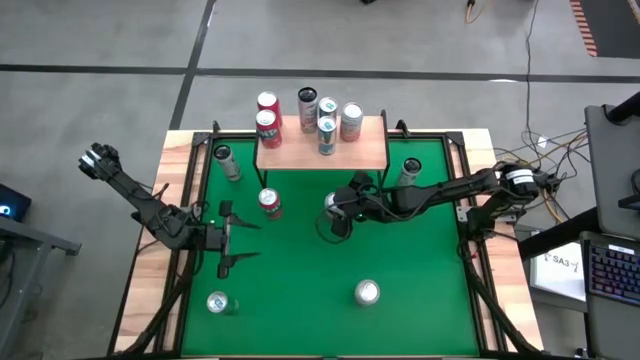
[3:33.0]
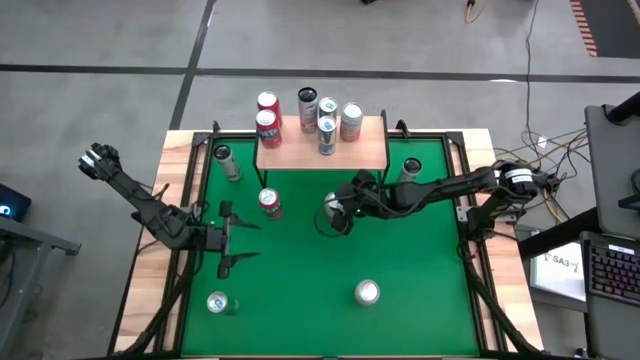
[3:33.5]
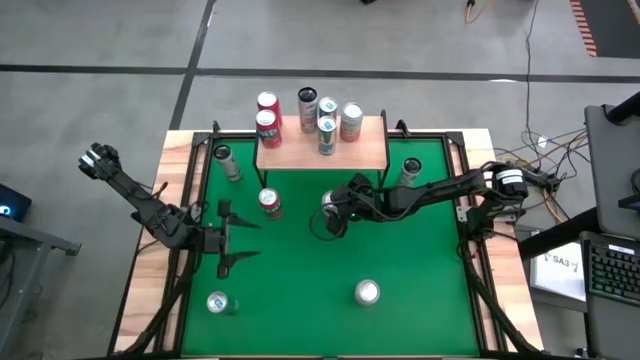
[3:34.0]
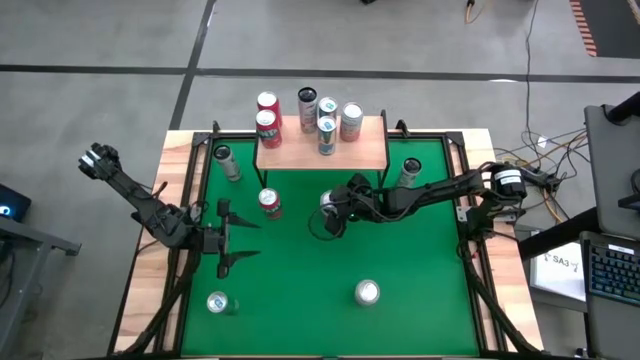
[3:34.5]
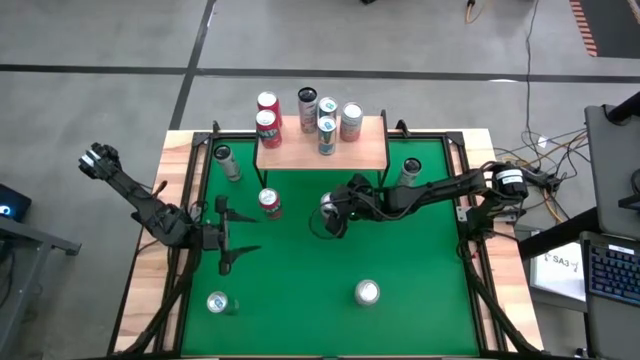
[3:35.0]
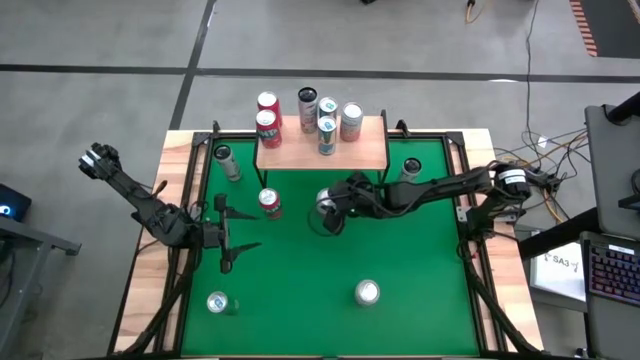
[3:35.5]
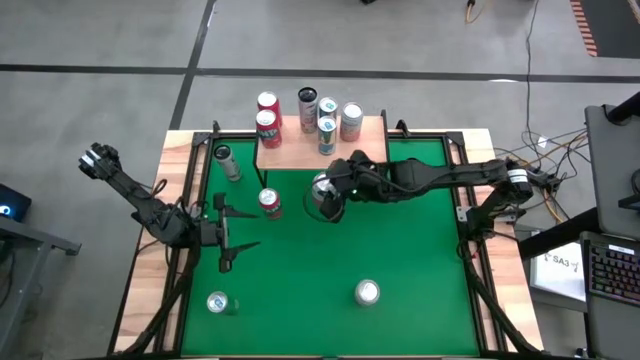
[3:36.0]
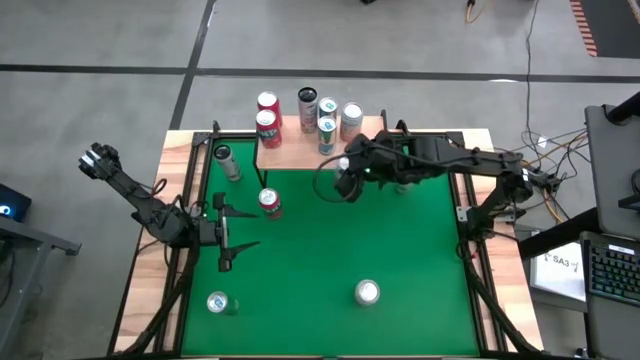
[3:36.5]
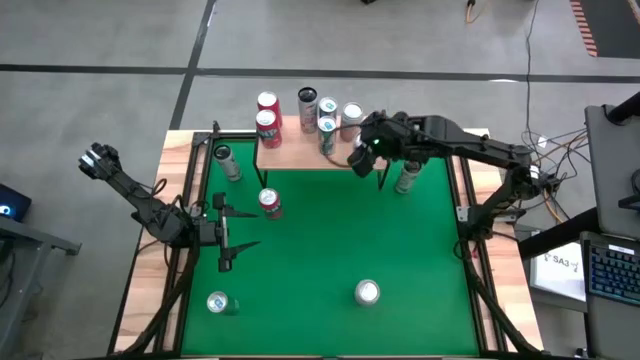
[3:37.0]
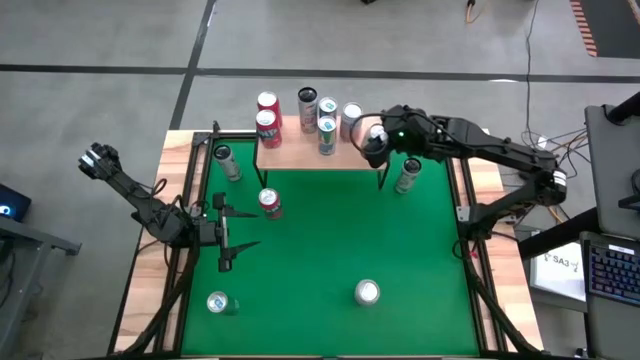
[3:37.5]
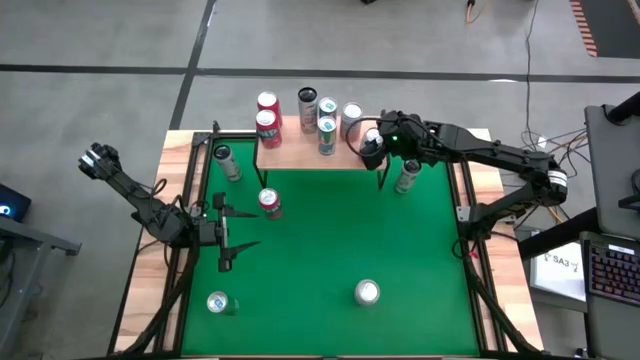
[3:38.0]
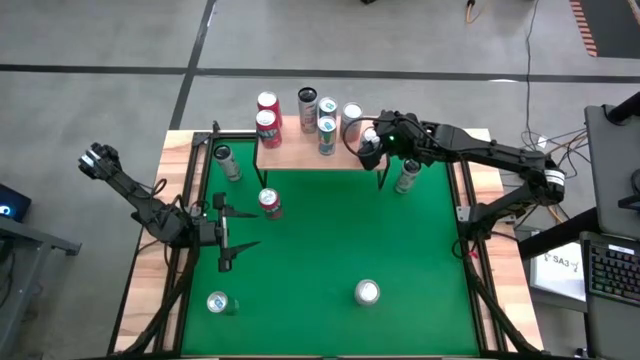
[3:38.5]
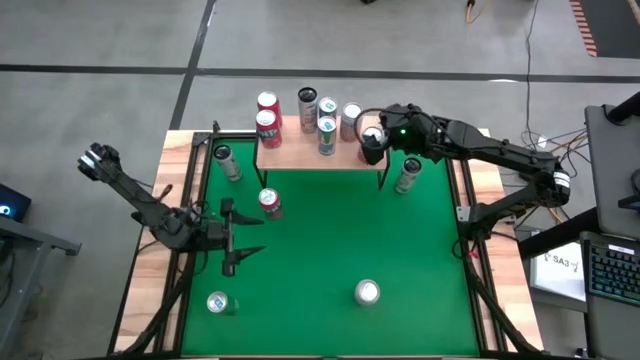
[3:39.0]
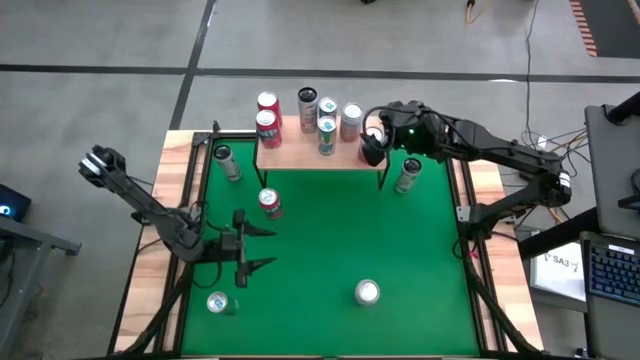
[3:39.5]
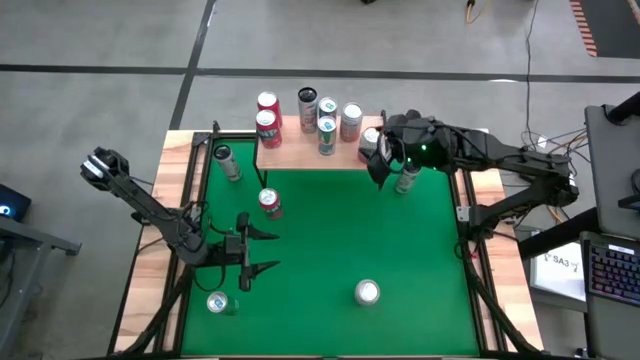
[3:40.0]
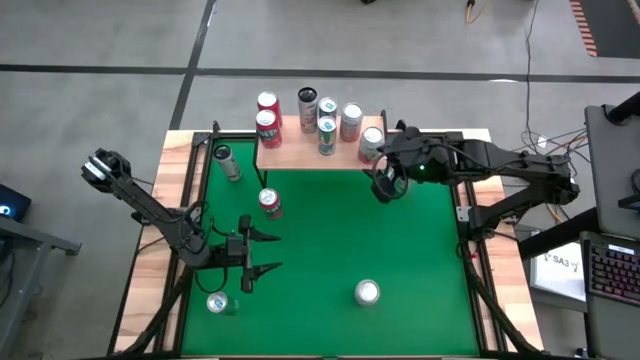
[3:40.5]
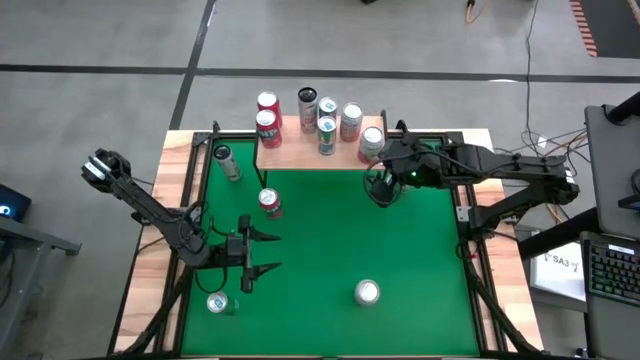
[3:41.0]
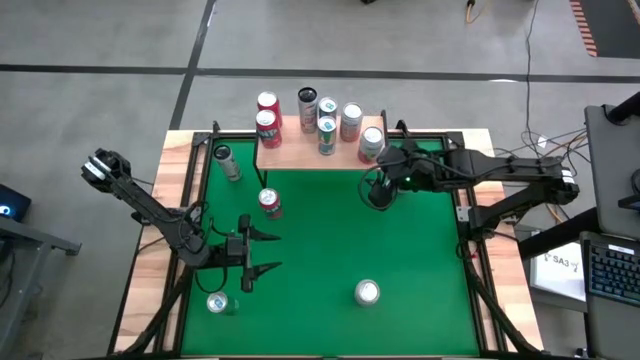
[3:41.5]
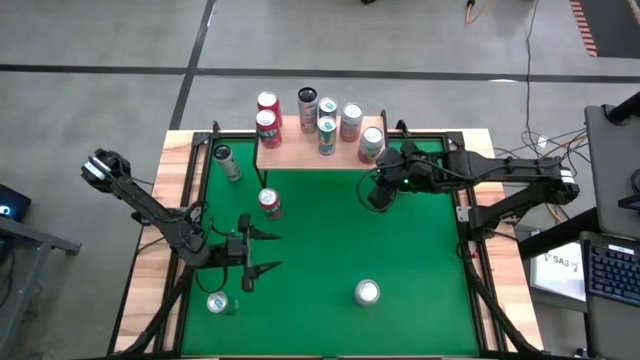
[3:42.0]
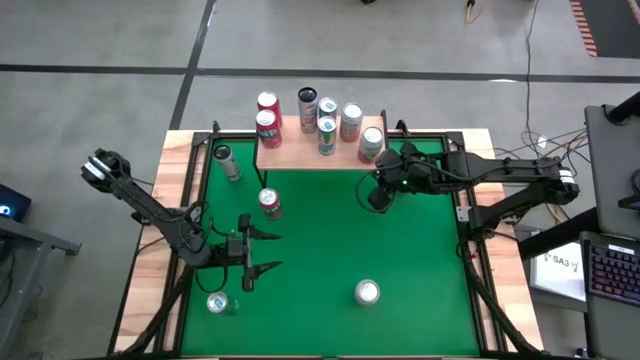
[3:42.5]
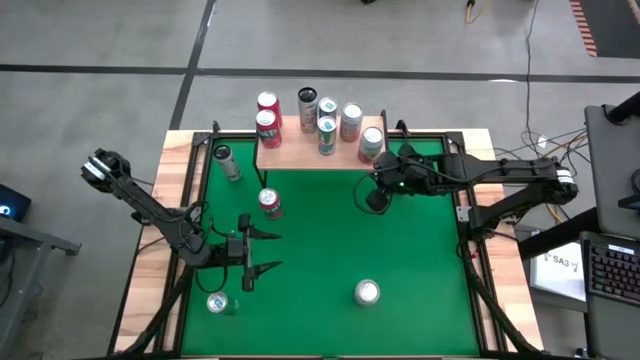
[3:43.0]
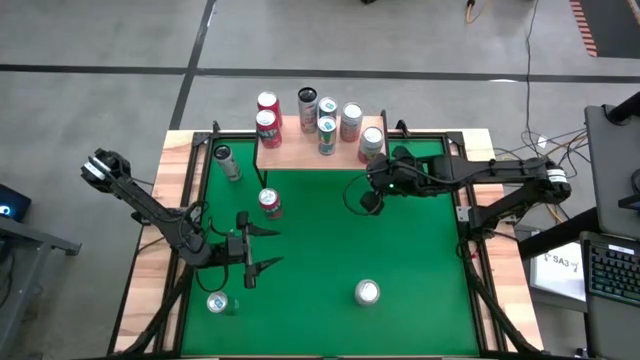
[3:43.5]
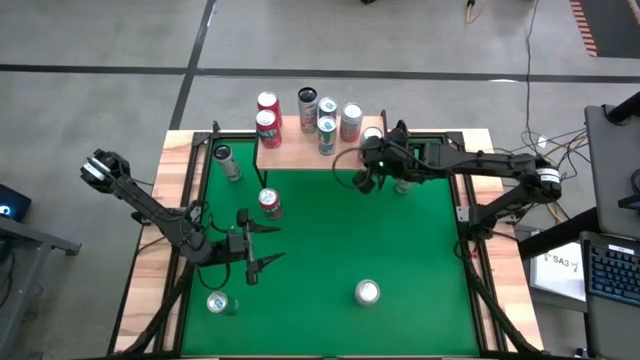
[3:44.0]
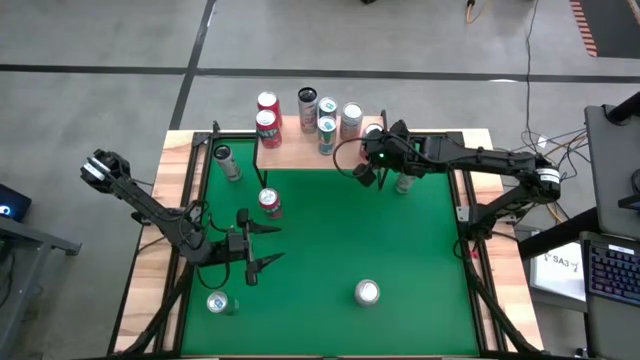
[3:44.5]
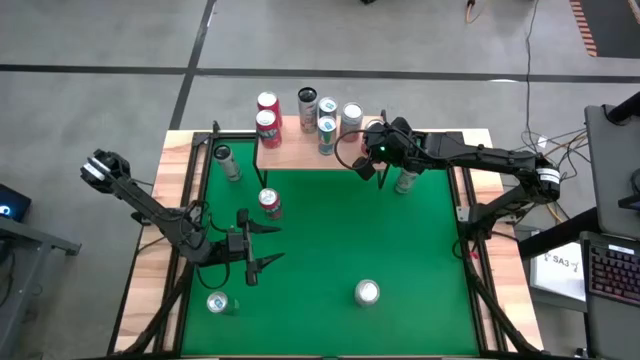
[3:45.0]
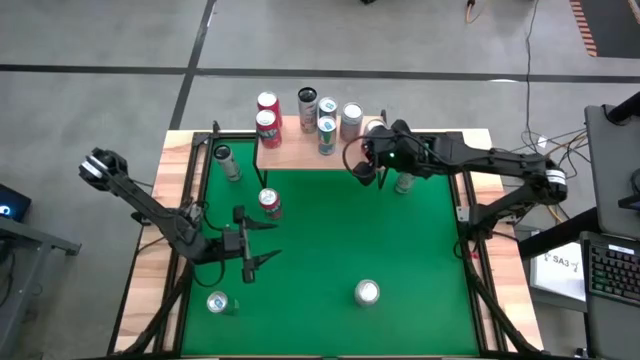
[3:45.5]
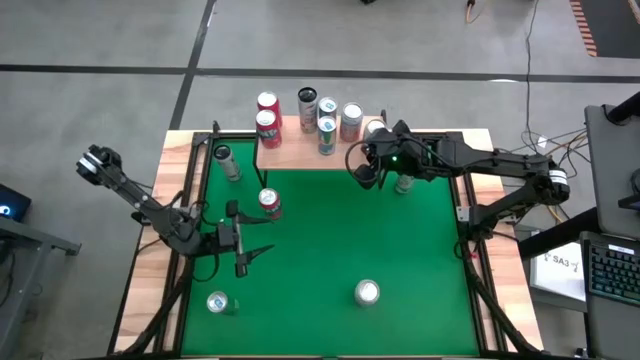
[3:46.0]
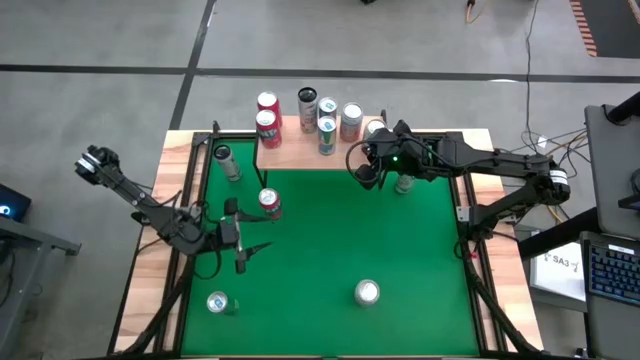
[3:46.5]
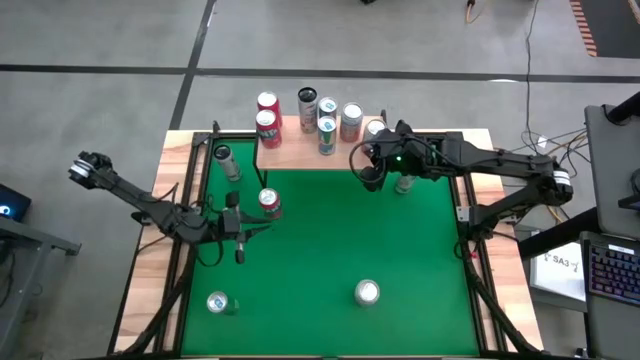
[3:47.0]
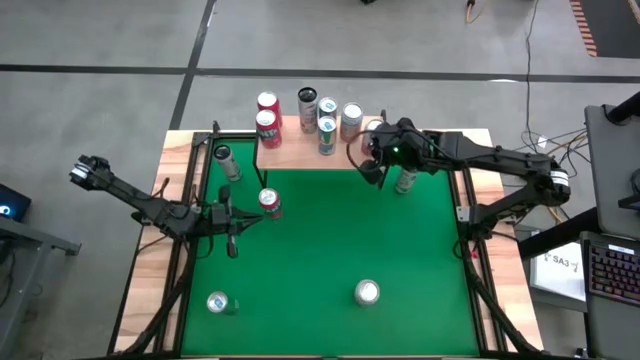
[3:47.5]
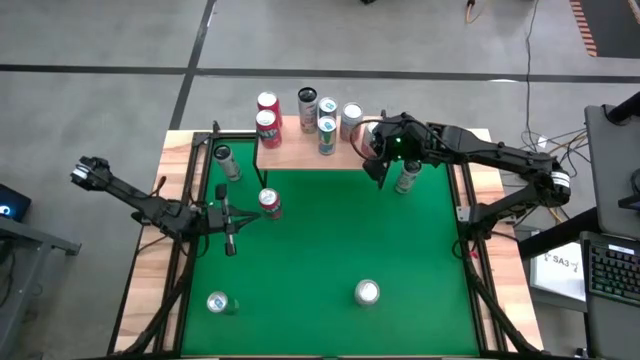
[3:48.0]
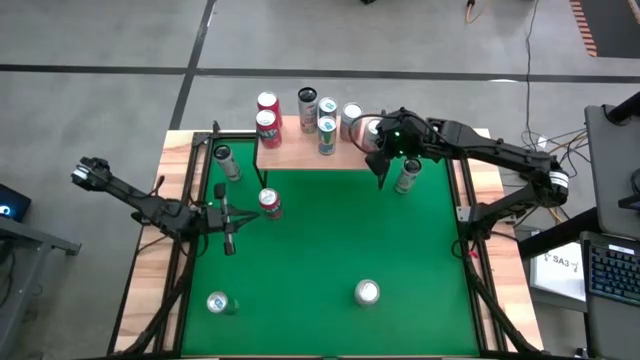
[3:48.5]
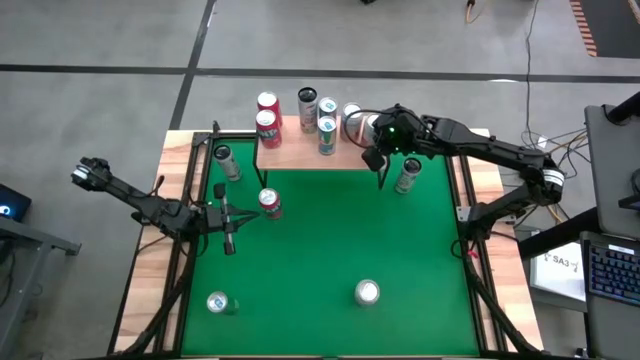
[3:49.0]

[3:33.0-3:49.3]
Task: Place canned beverage on shelf
Put the top white and pink soda can on the shelf

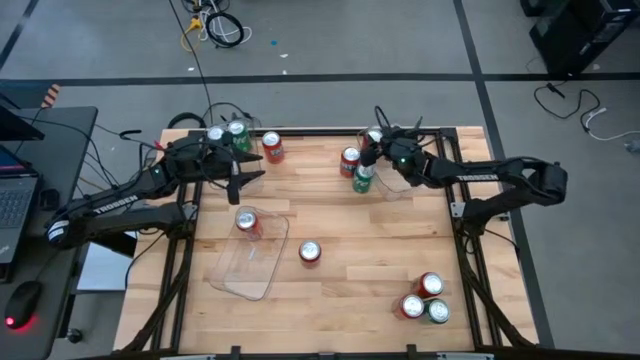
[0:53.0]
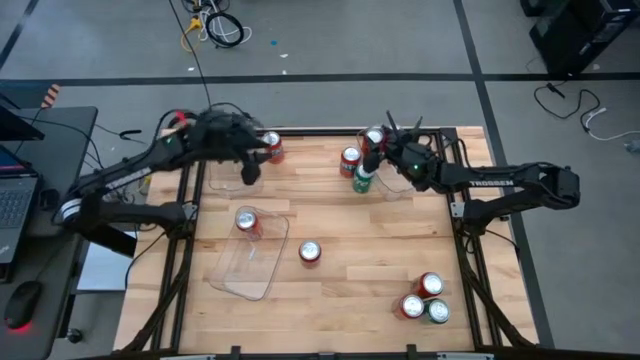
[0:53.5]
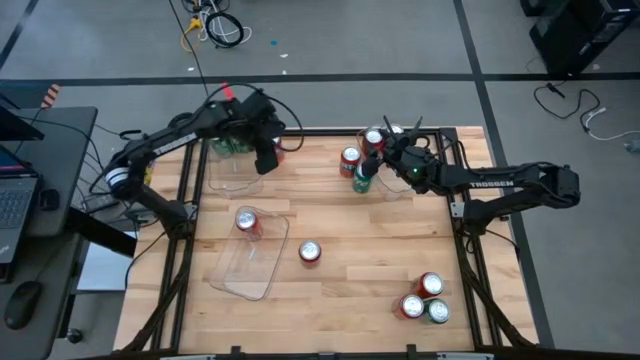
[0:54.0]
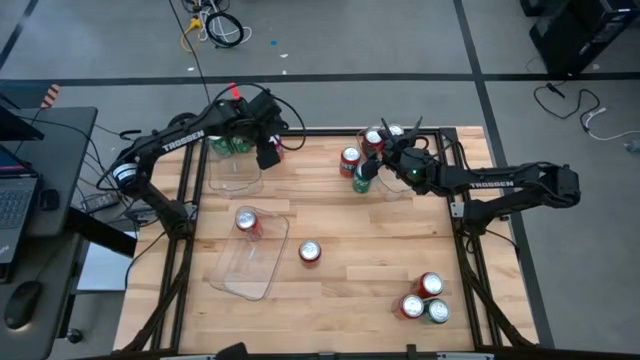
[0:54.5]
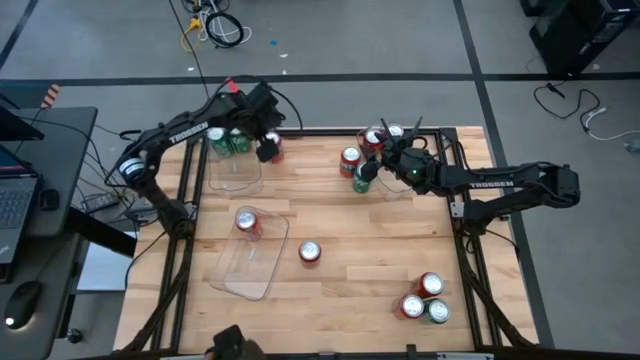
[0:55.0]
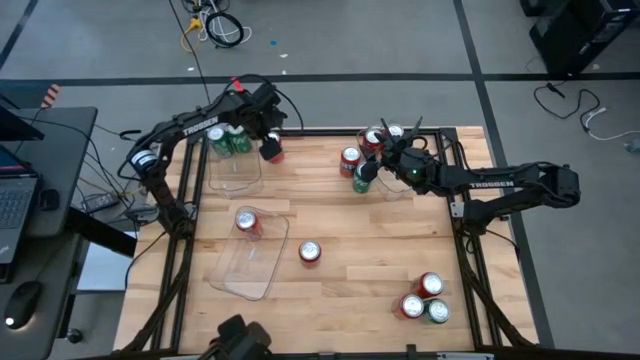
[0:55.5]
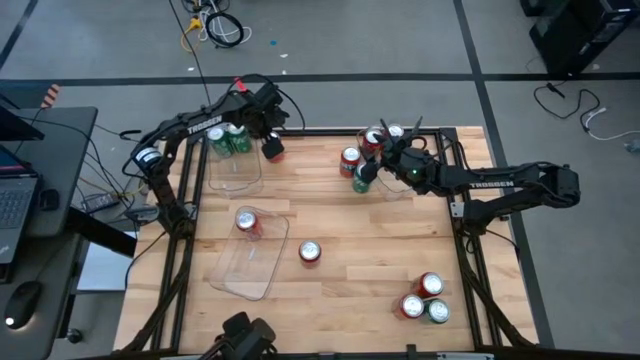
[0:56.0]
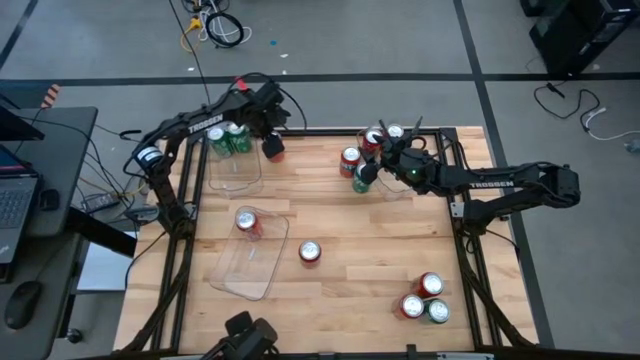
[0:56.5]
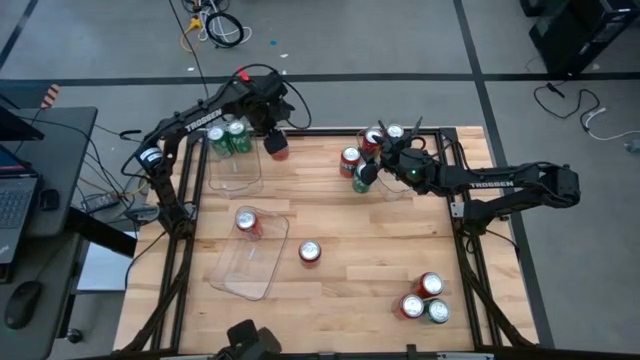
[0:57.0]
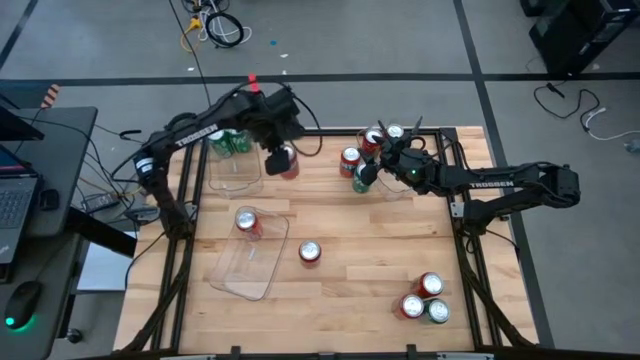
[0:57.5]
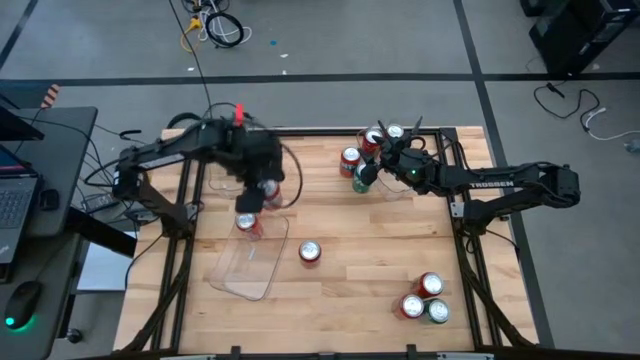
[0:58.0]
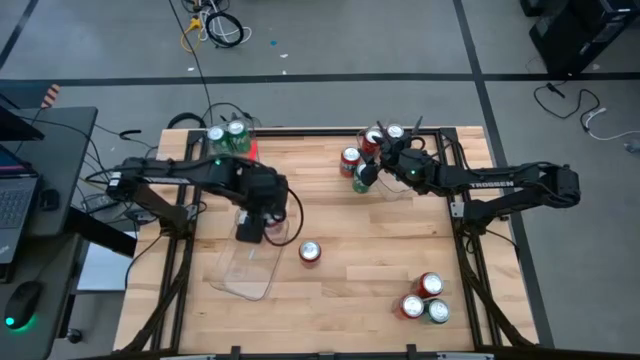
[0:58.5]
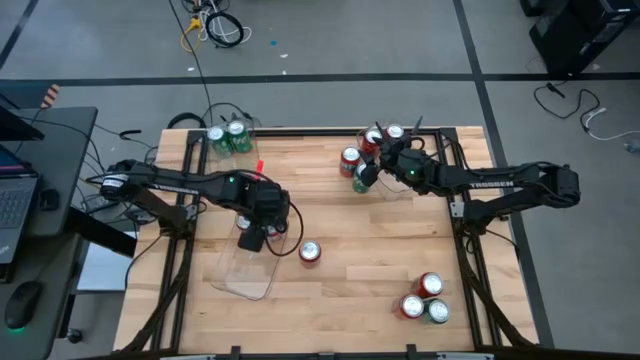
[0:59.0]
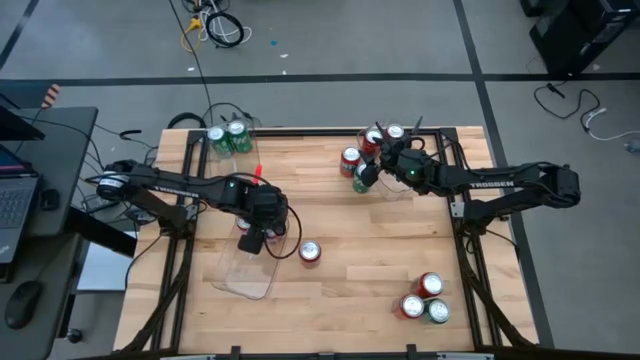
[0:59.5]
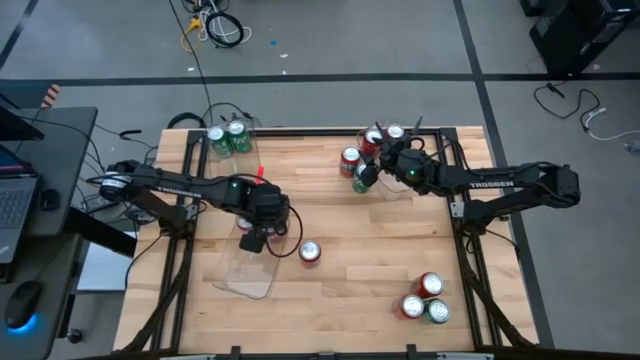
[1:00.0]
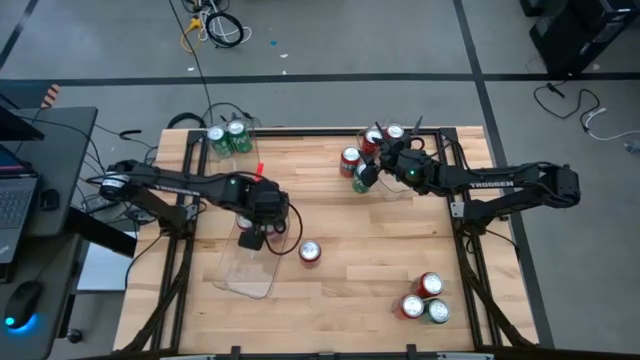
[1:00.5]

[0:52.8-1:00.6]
Task: Sort soda cans
Put the top left red soda can into the bottom transparent bin
